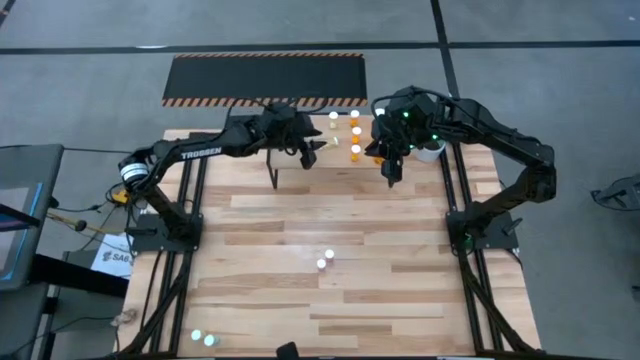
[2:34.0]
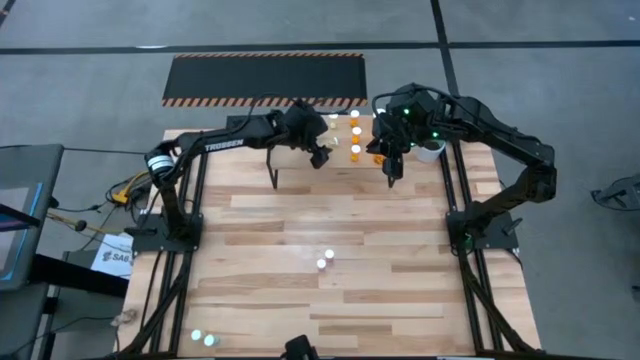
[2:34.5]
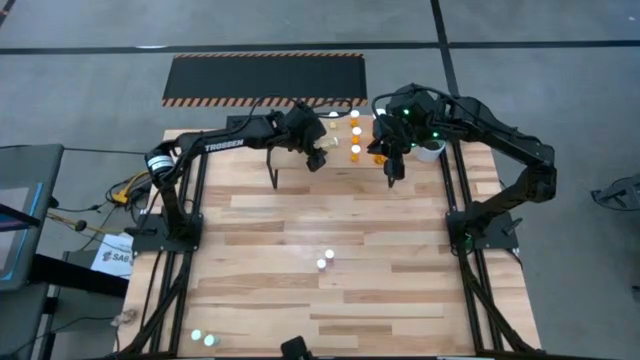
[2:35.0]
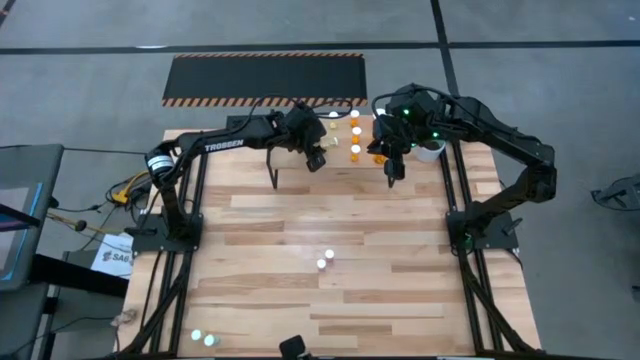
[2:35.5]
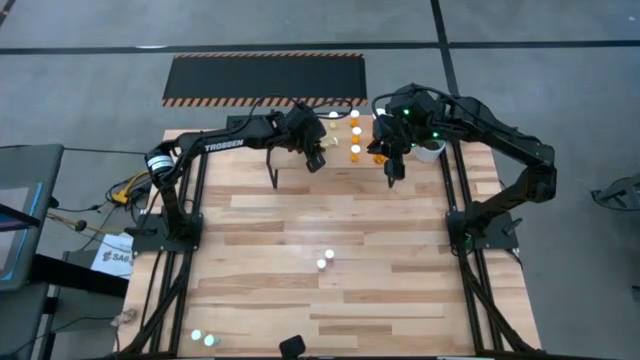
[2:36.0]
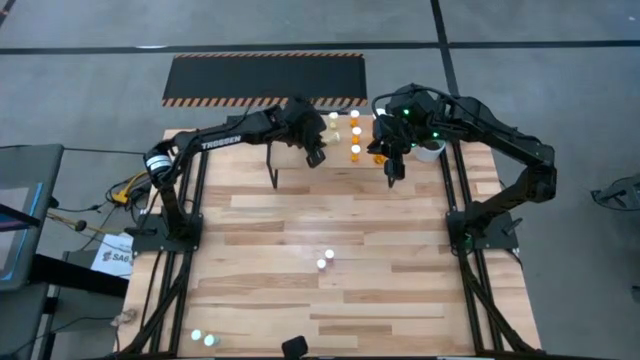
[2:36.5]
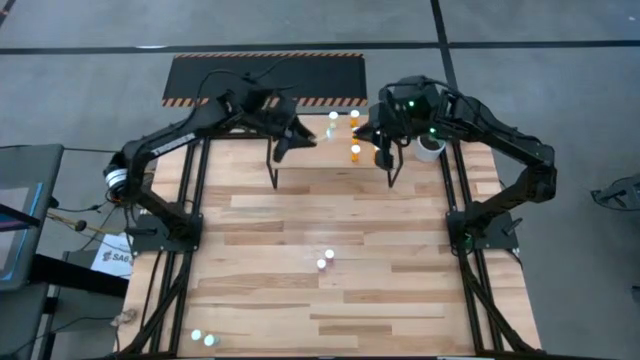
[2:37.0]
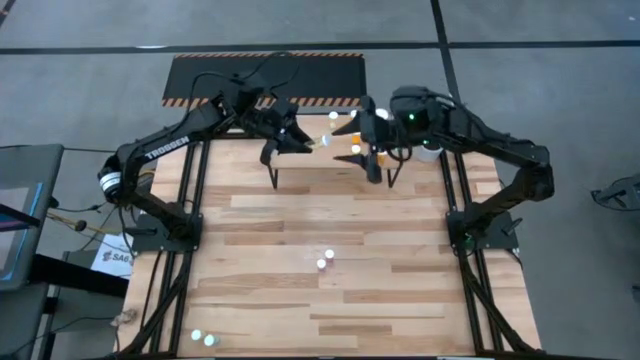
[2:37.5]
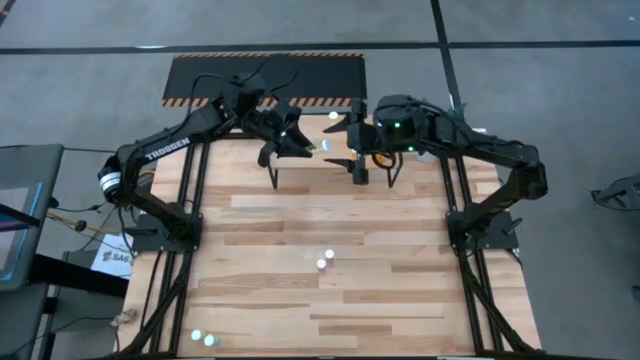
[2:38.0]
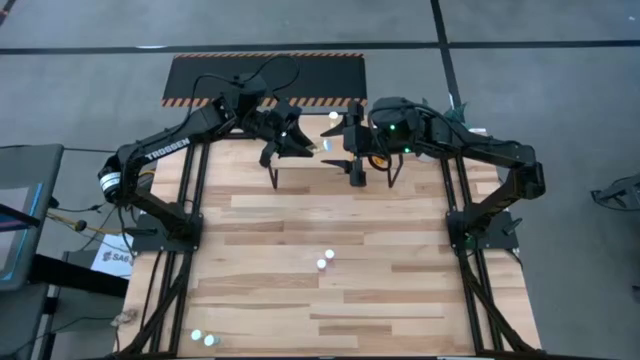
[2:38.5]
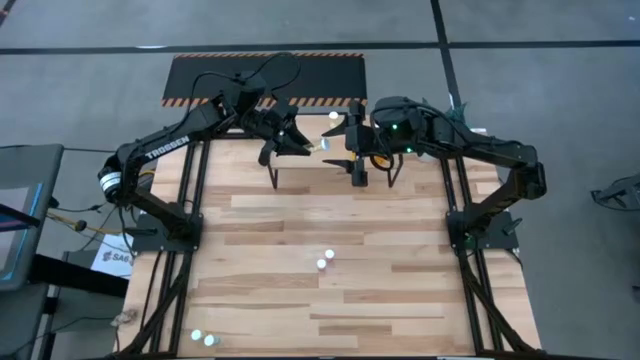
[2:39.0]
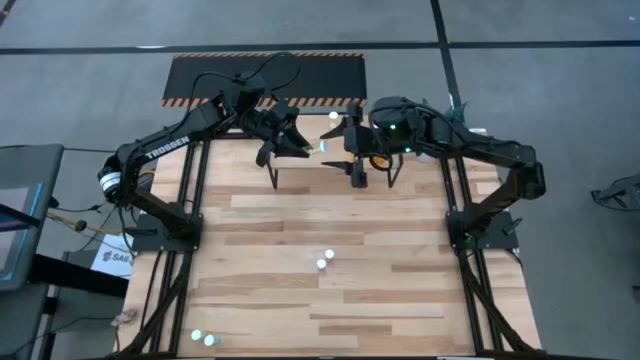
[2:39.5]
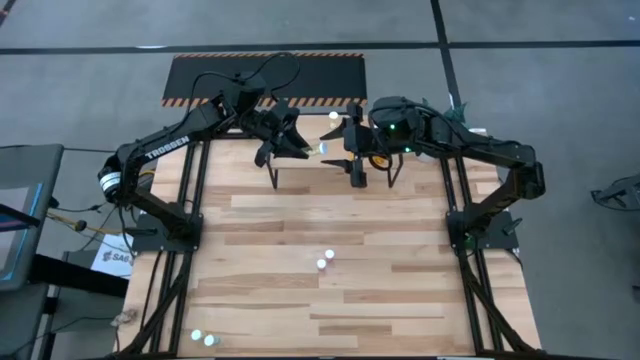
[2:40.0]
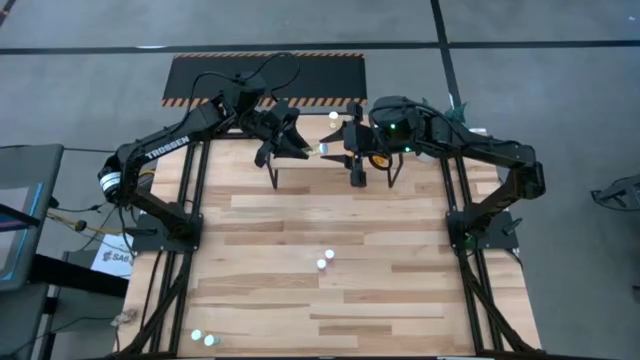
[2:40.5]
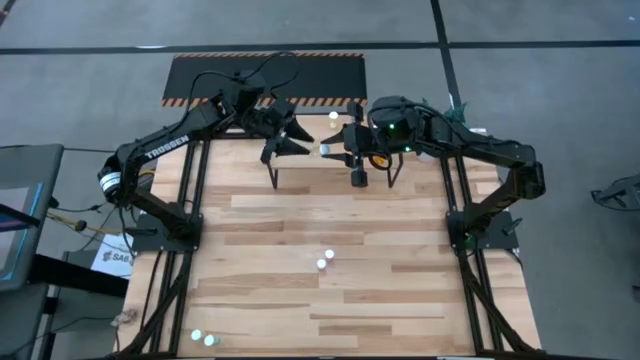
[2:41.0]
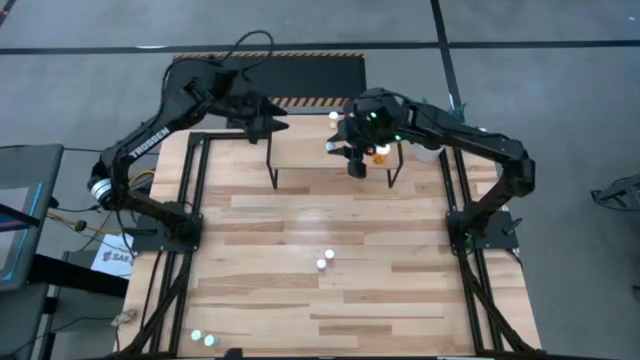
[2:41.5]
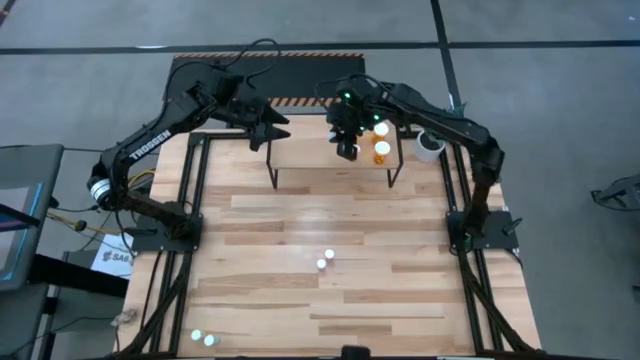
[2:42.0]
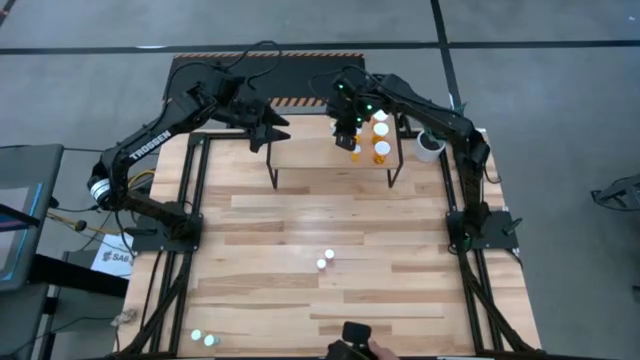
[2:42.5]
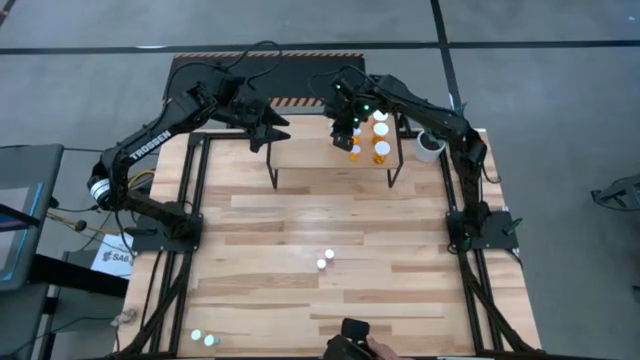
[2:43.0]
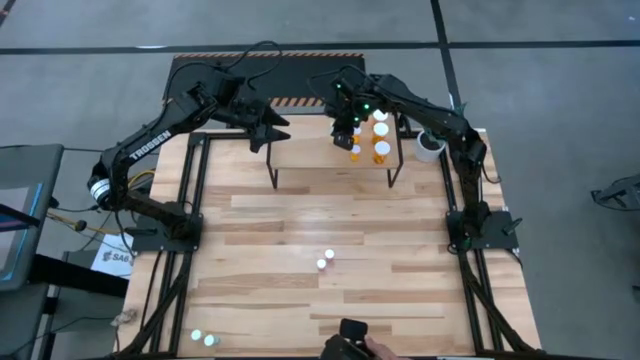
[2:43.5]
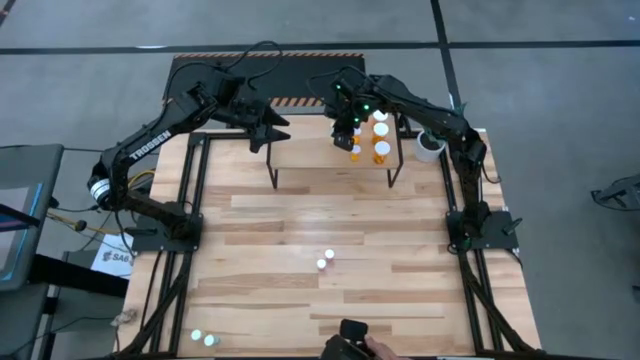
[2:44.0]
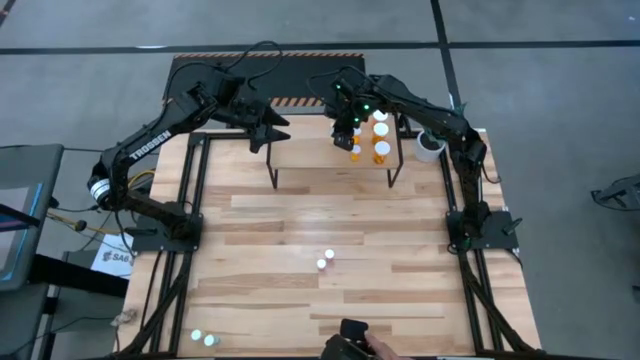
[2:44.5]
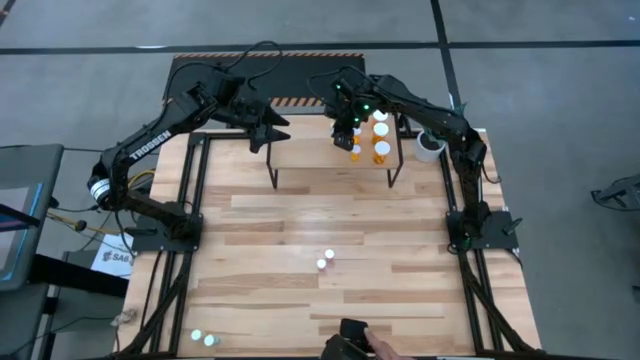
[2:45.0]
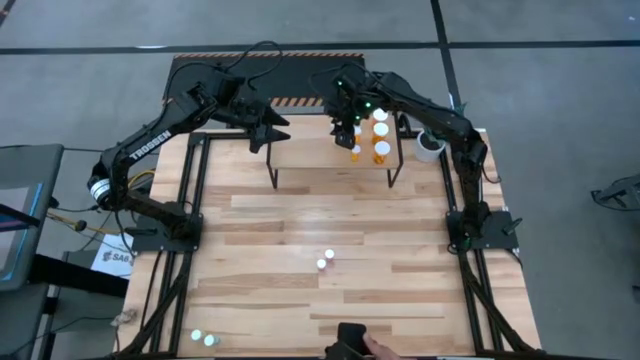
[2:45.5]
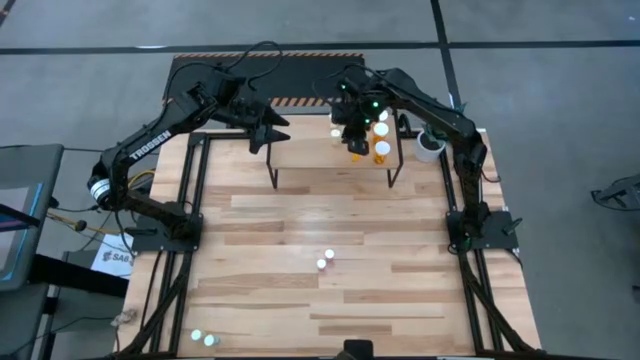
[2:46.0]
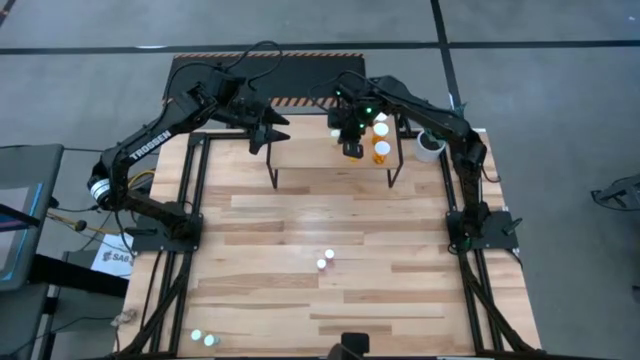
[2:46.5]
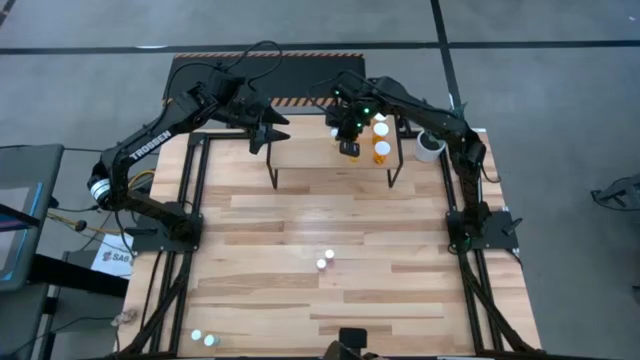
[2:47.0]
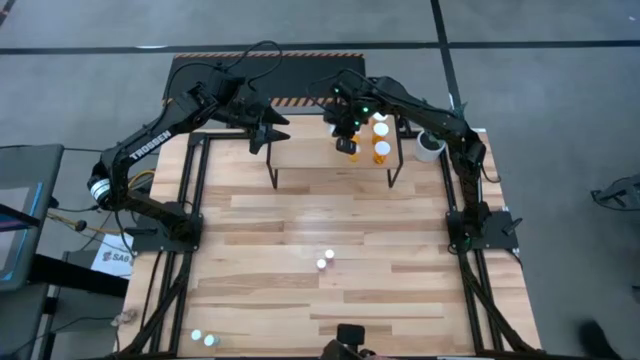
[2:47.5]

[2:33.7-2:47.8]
Task: Pick and place medicine bottles onto shelf by color
Put the top small yellow pill bottle on the shelf aligned with the other small yellow pill bottle

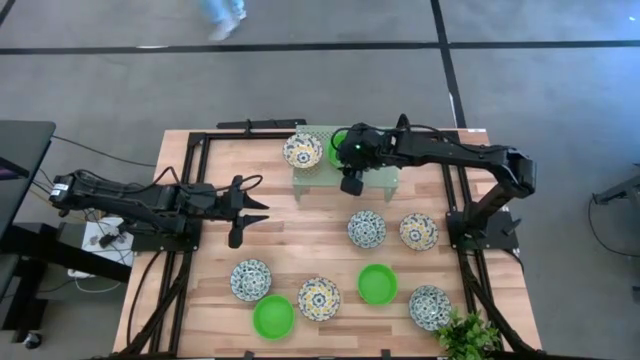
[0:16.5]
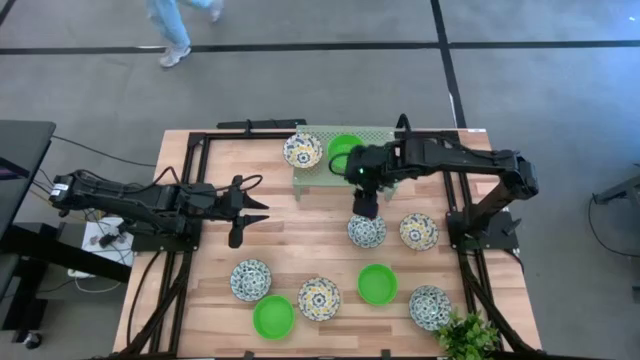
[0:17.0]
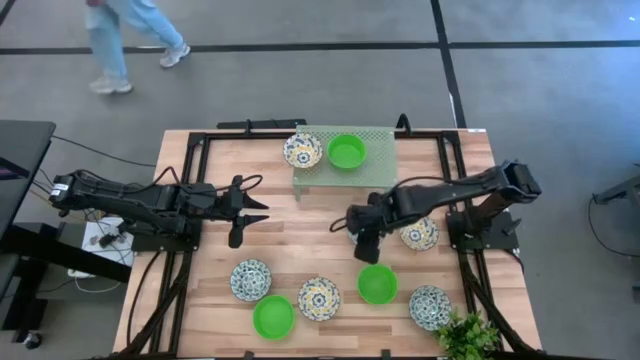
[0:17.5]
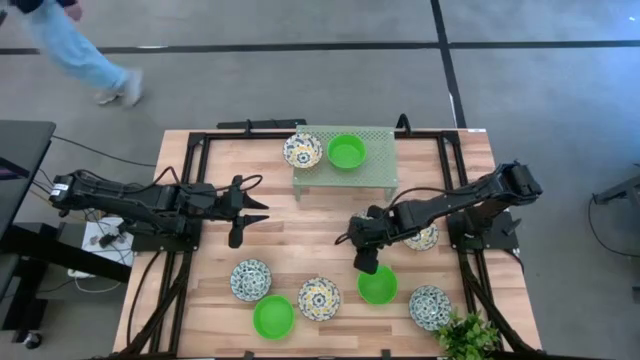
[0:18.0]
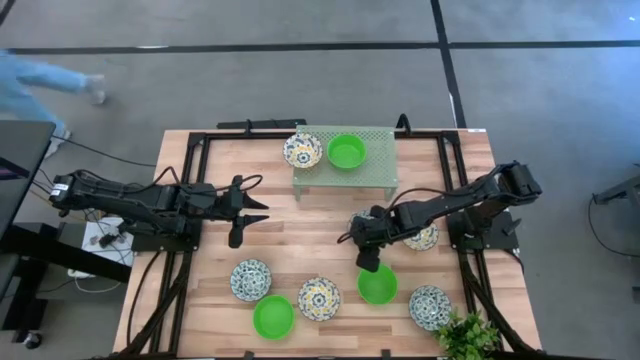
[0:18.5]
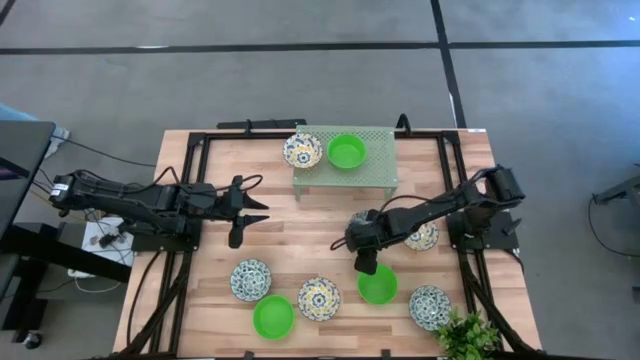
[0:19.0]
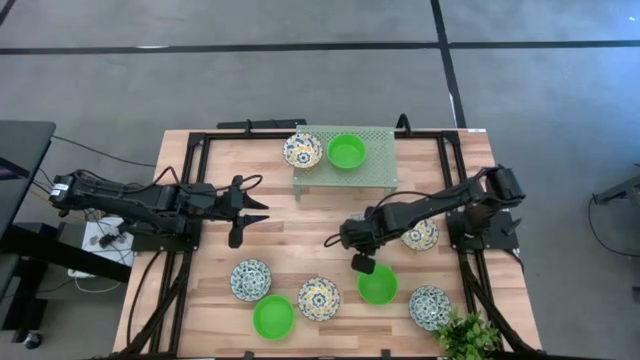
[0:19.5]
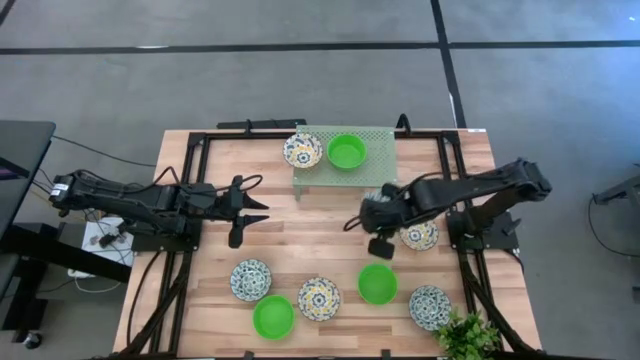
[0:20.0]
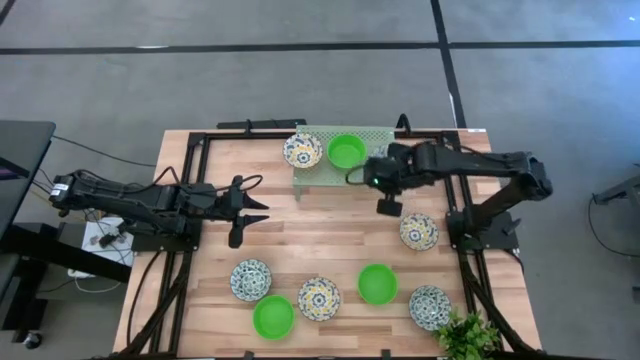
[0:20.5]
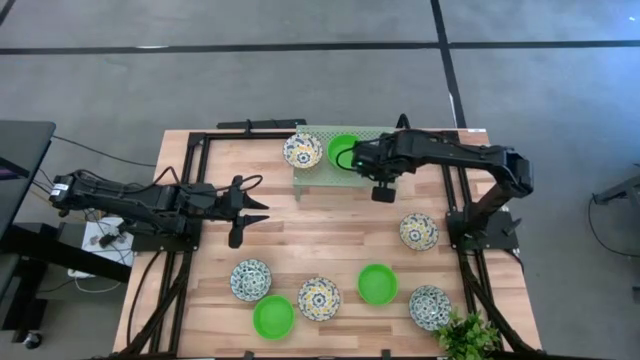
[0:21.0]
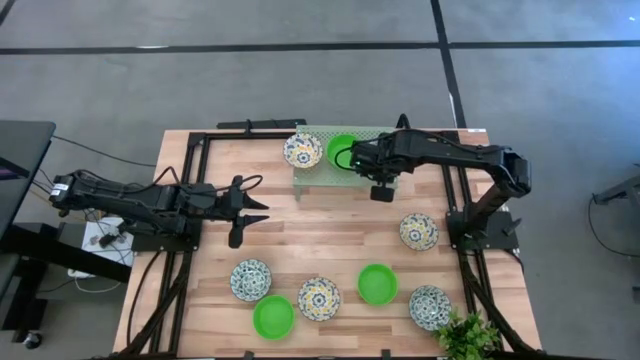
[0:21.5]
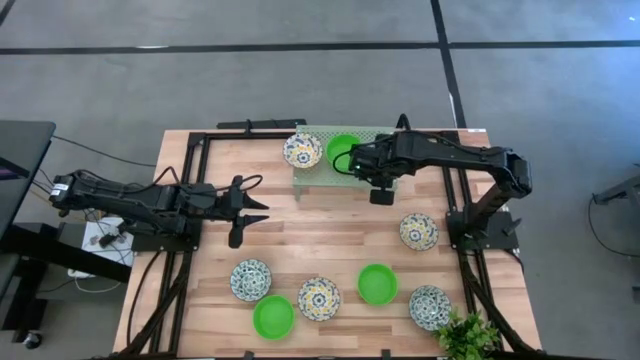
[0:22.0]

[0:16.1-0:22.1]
Task: Pick & Place Mini bowls
Put the top light blue bowl on the shelf
